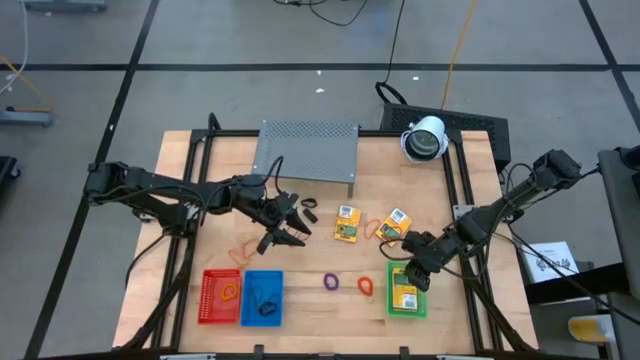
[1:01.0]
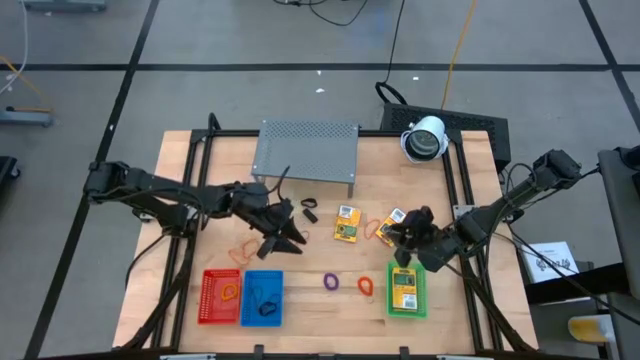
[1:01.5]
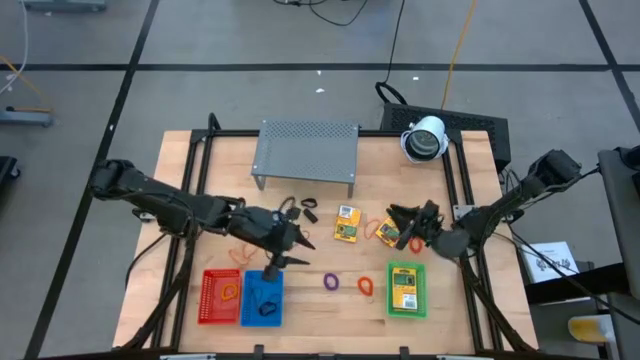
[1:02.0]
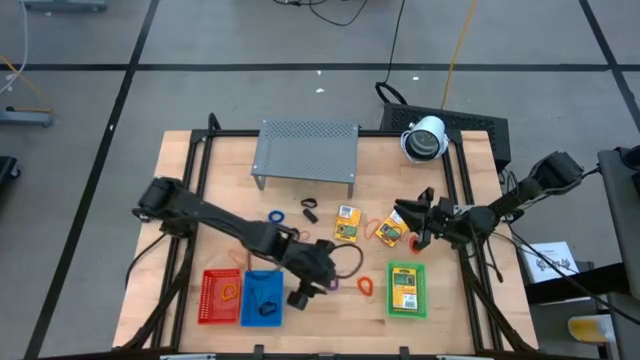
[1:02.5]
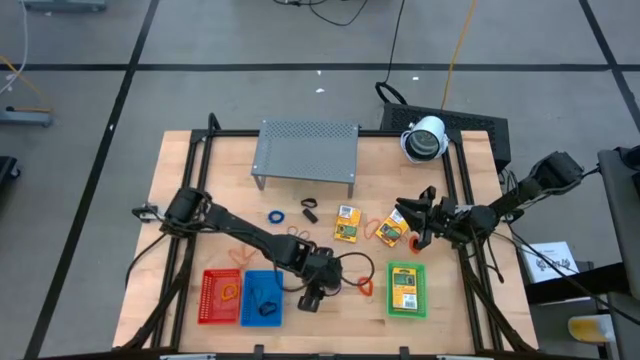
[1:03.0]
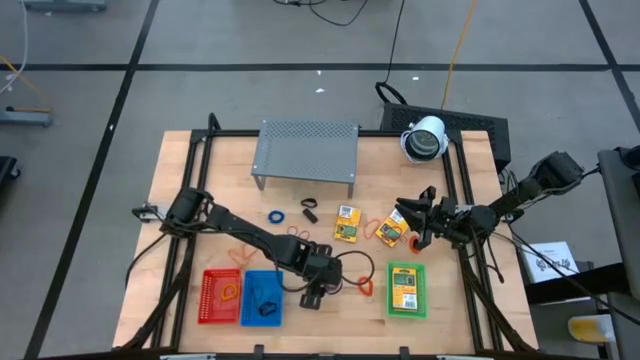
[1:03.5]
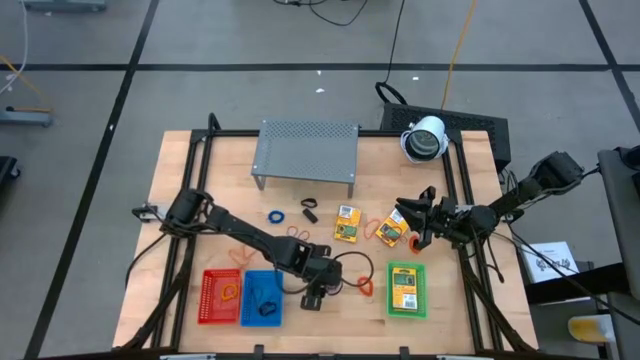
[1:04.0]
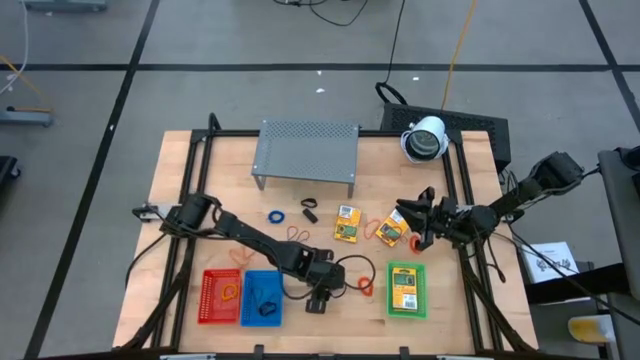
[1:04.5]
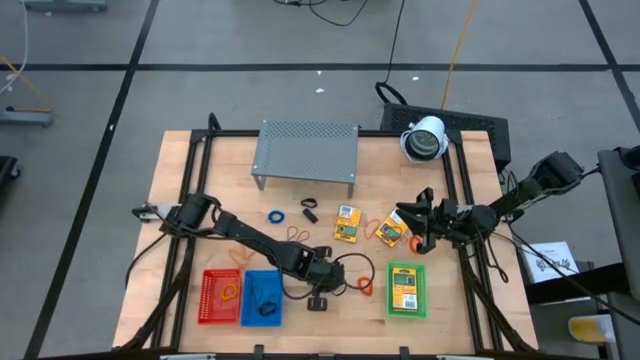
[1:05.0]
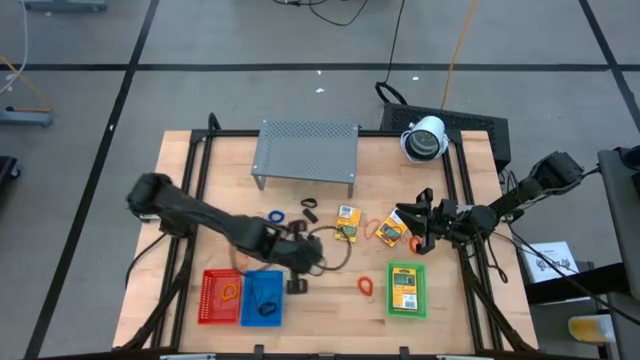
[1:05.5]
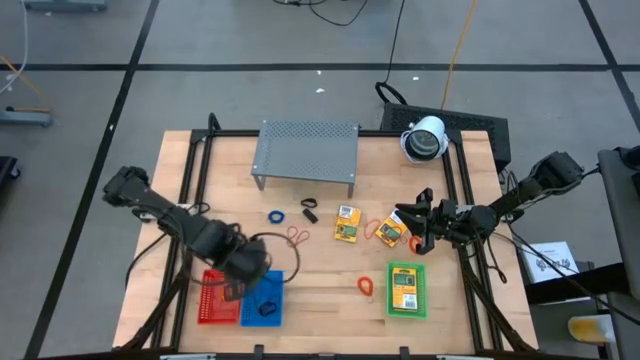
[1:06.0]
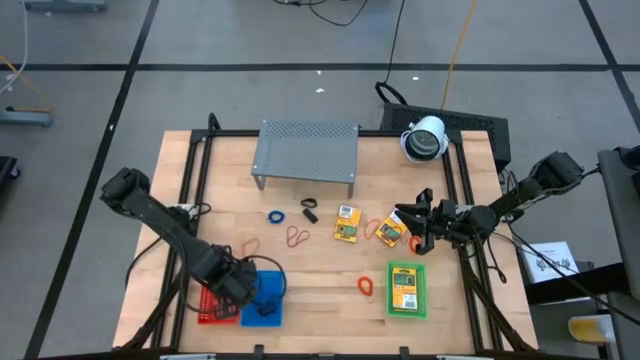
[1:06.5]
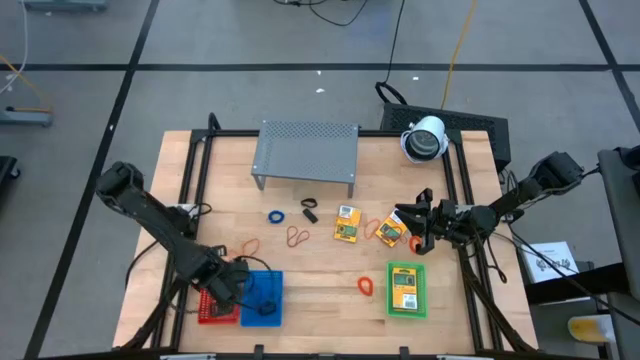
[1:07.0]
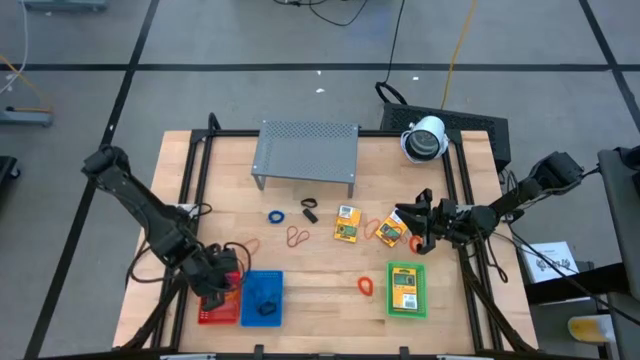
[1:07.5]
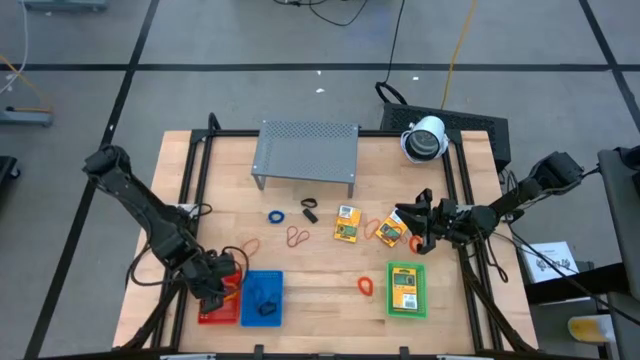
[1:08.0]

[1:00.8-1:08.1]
Task: Pick & Place Office Desk Supplies
Put the purple spring keychain into the red bin

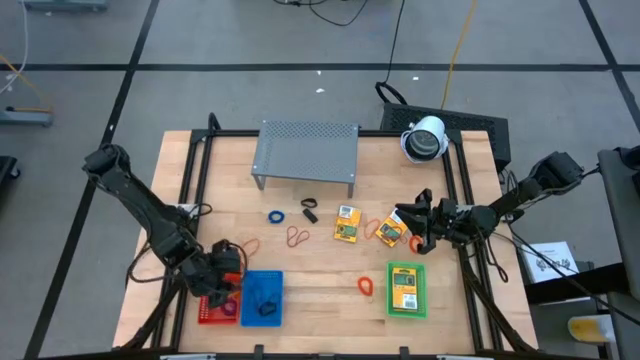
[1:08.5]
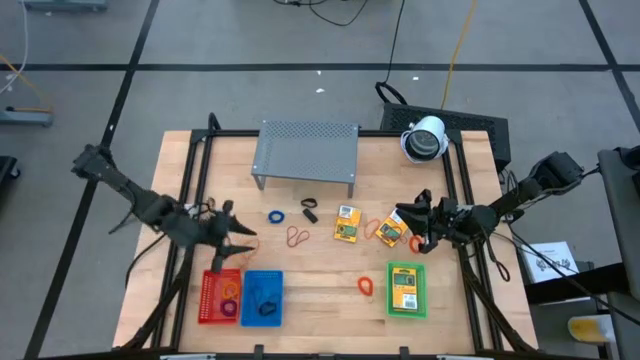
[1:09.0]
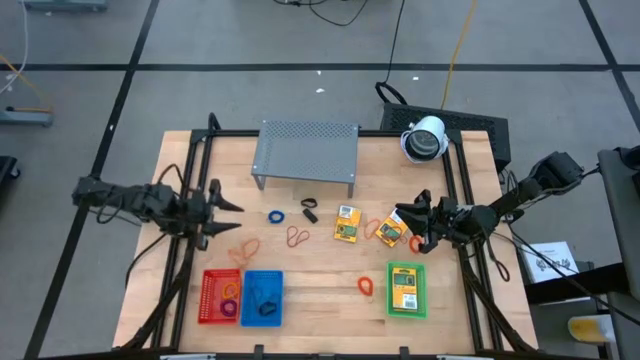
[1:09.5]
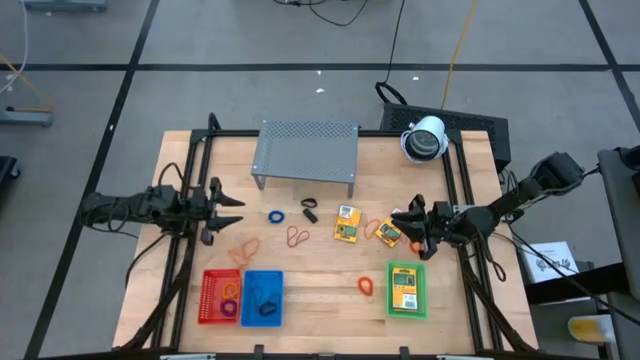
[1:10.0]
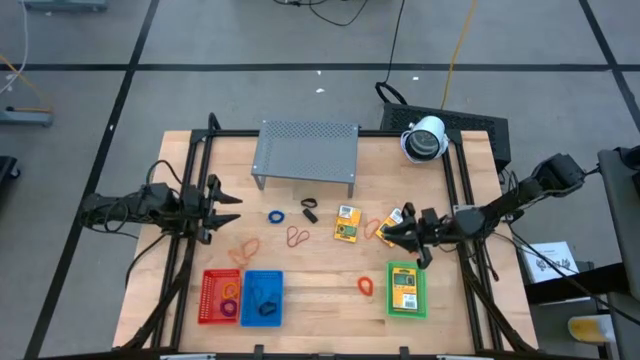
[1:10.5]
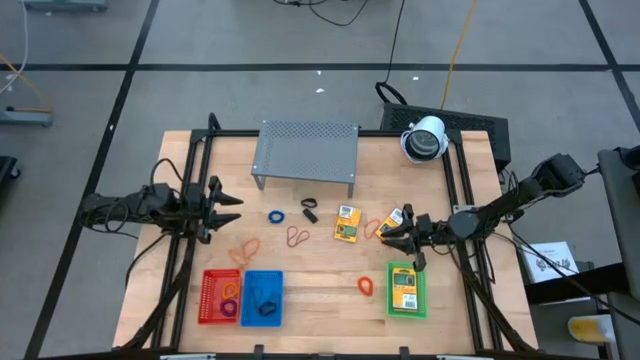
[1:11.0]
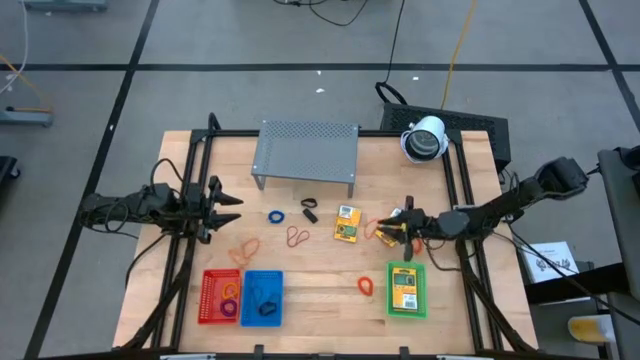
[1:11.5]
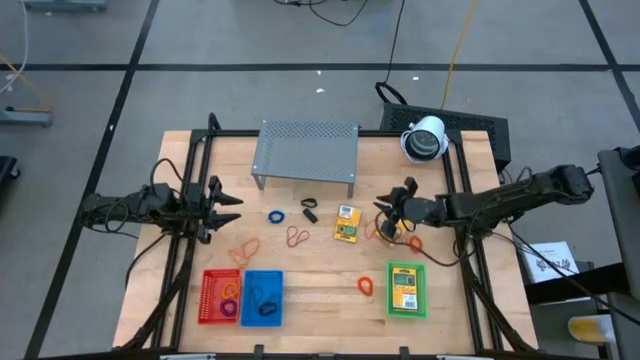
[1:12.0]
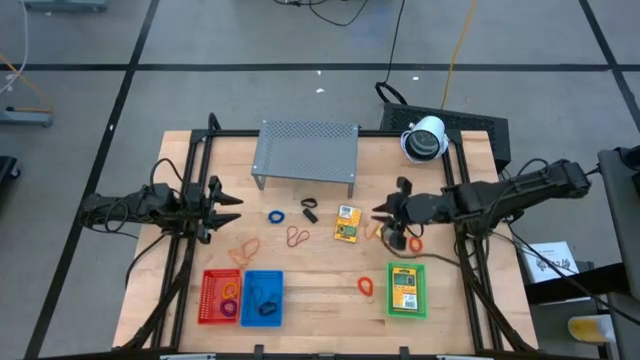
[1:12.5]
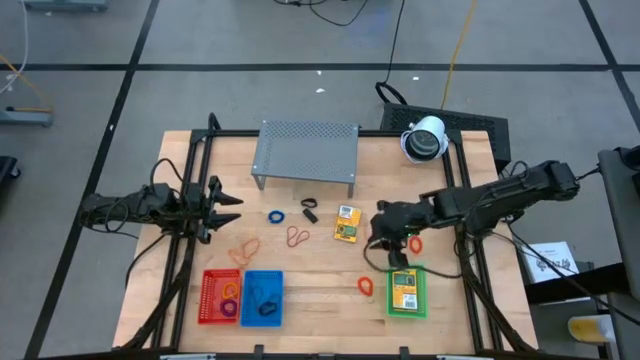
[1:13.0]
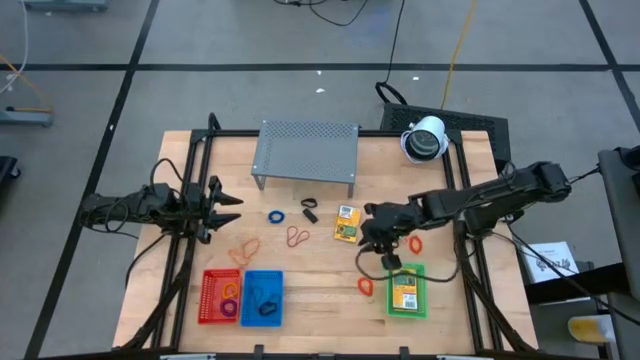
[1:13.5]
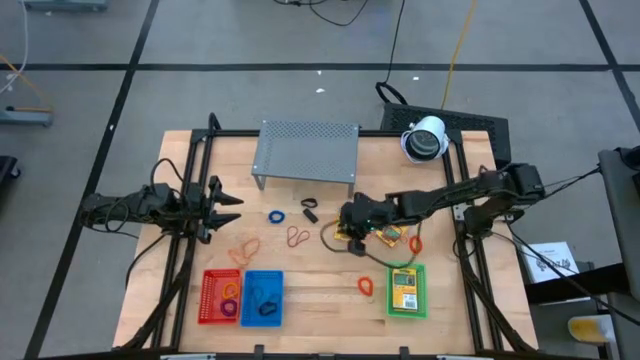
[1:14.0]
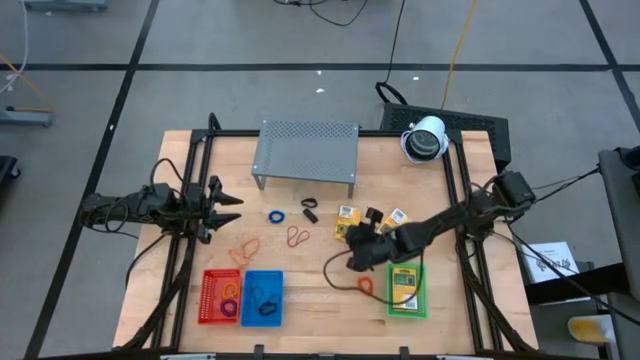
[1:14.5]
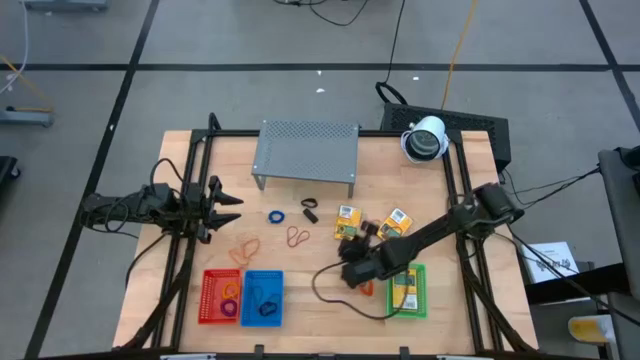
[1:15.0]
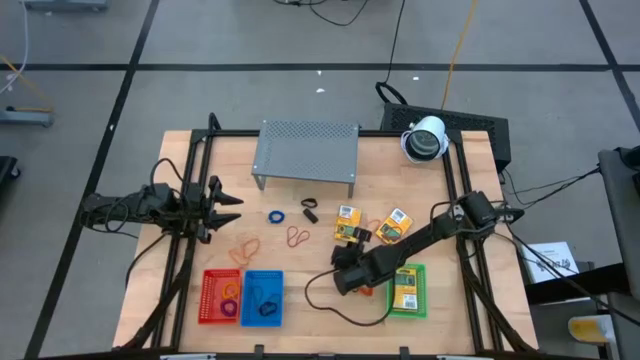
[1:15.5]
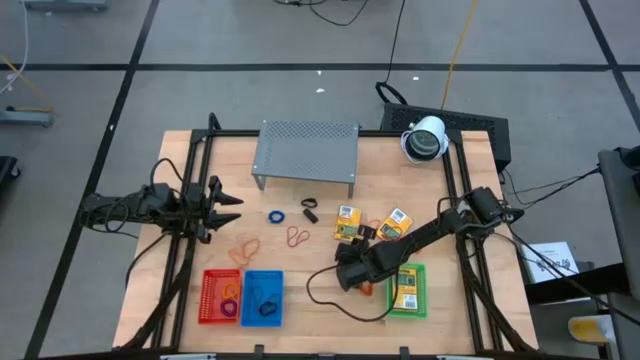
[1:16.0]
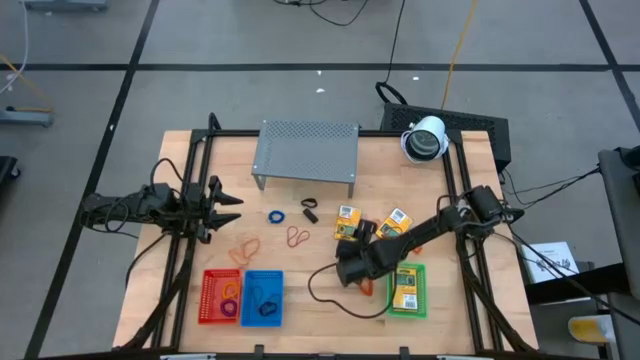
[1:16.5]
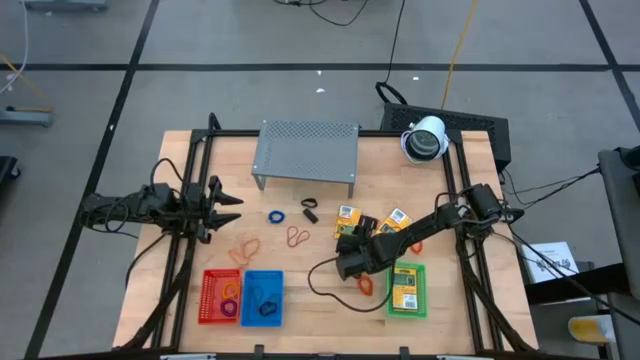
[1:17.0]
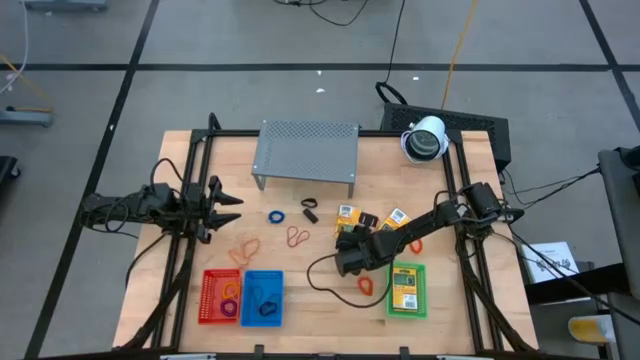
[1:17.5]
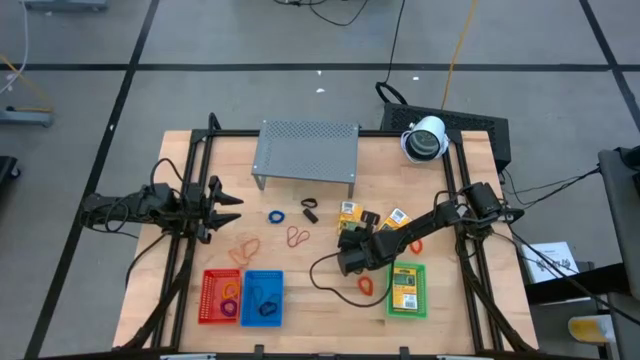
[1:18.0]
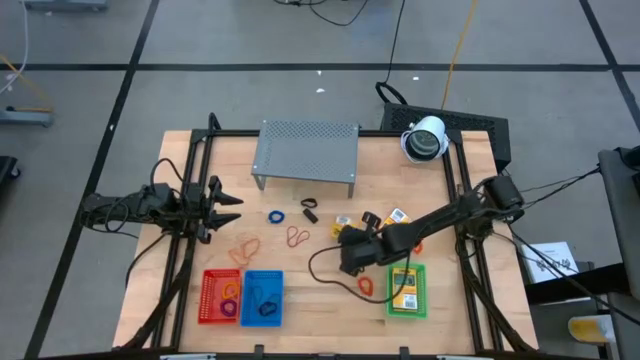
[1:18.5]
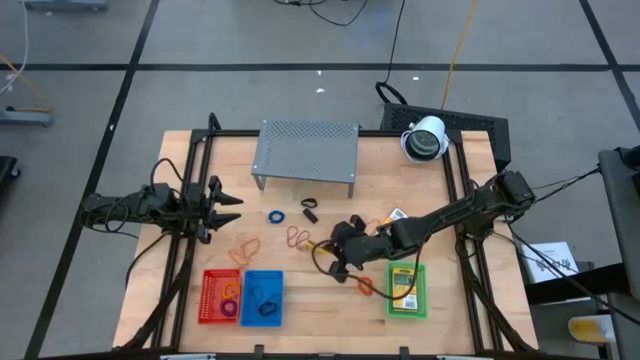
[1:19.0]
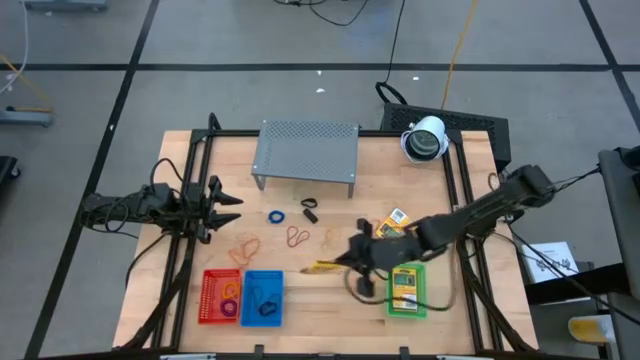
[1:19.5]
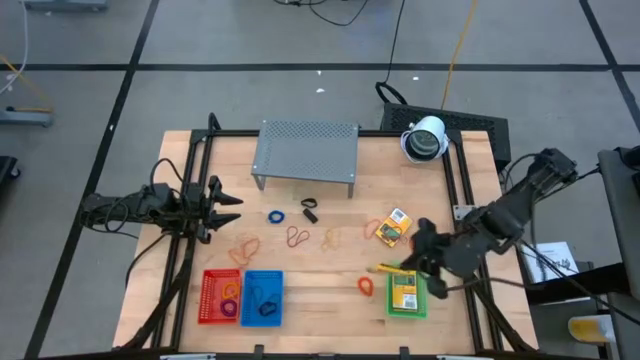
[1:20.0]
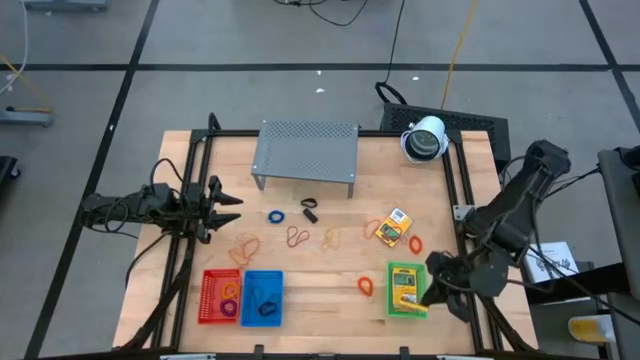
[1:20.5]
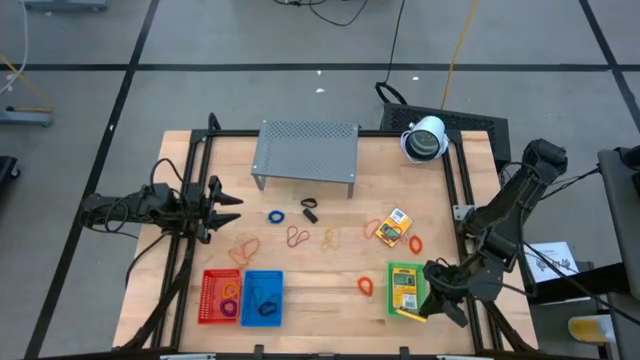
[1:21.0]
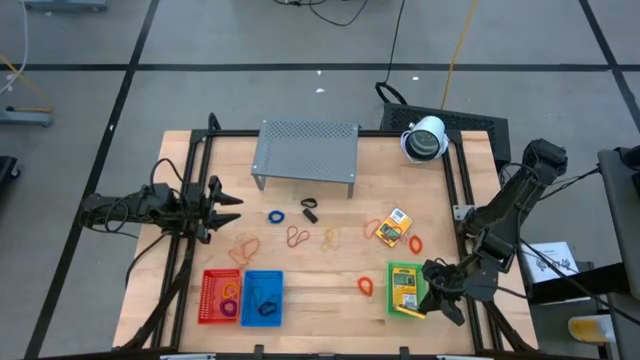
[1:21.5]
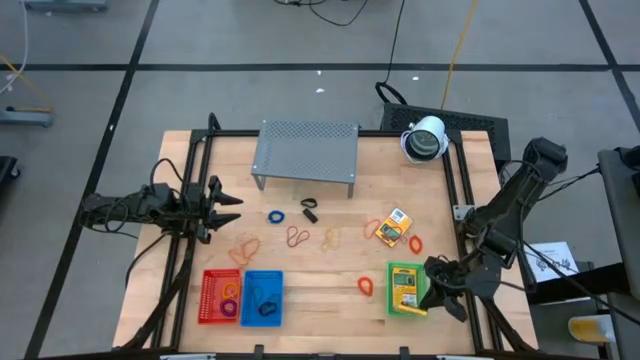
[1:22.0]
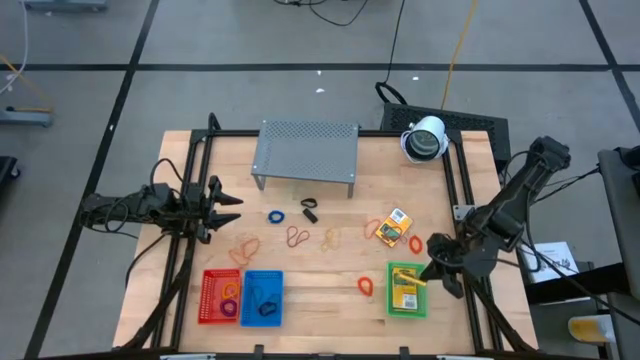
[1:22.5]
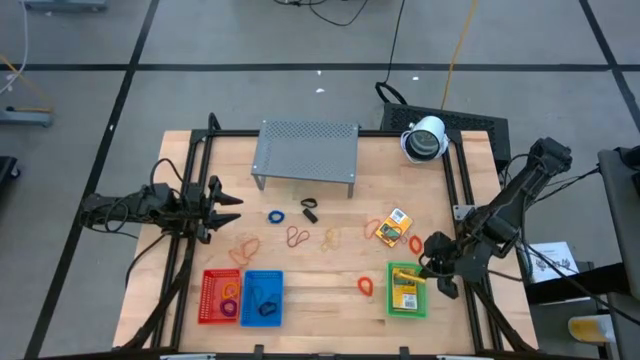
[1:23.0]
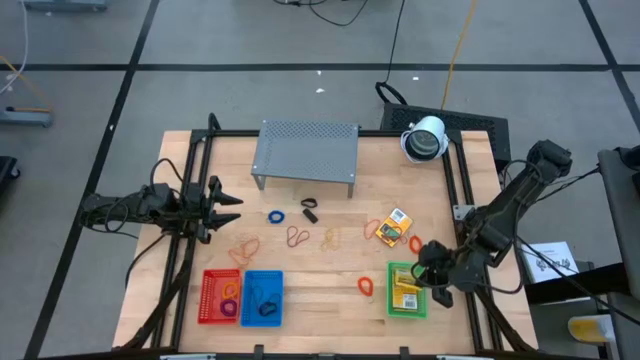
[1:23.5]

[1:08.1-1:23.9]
Put the yellow crayon box into the green bin

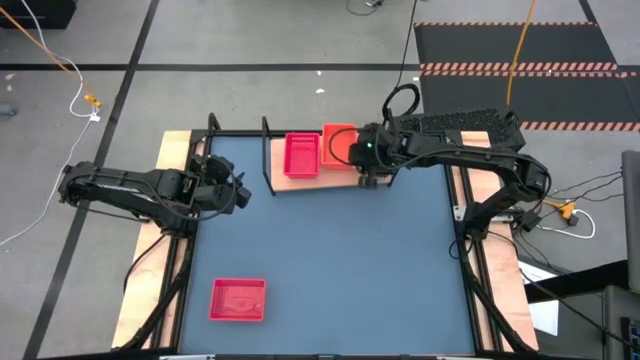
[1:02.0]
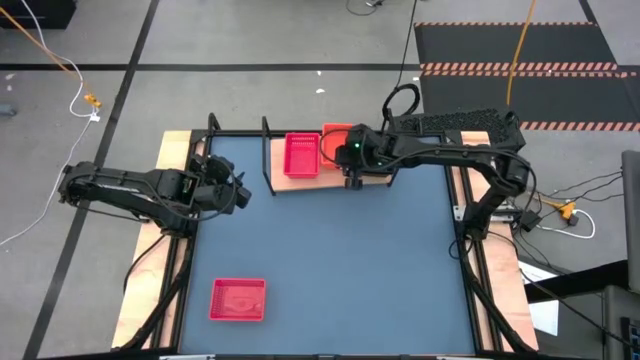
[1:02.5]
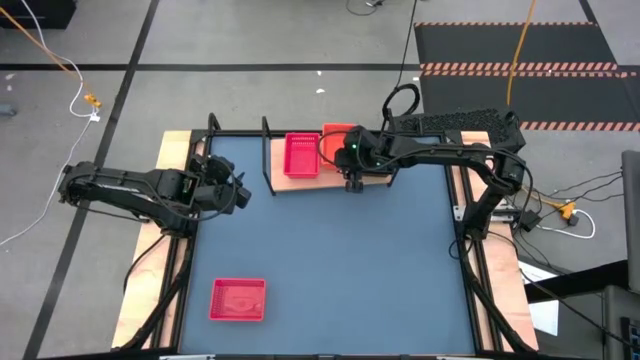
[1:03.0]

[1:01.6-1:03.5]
Task: Stack baskets on shelf by color
Adjust the stacked orange bins on the shelf
